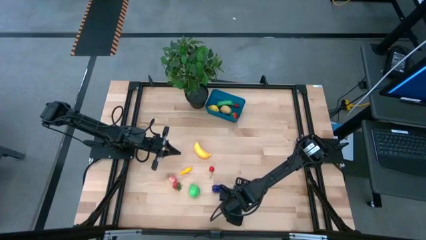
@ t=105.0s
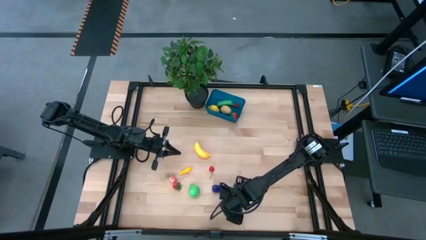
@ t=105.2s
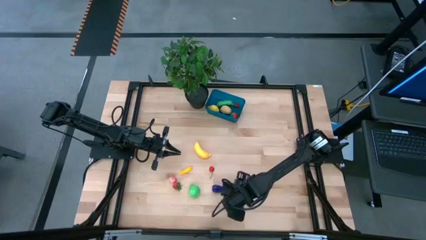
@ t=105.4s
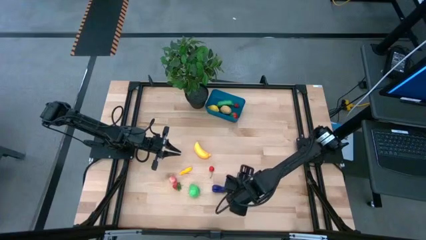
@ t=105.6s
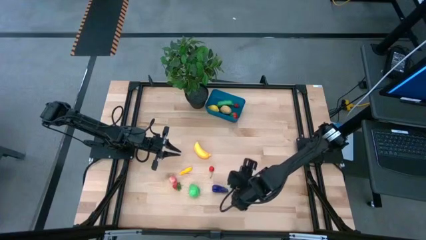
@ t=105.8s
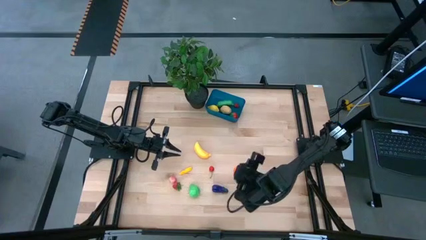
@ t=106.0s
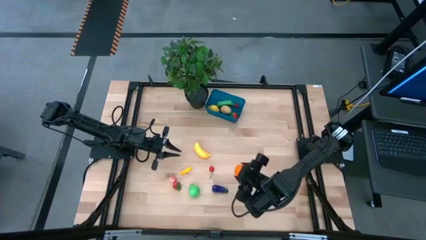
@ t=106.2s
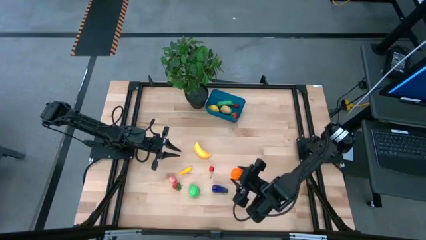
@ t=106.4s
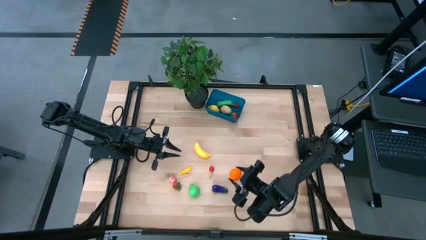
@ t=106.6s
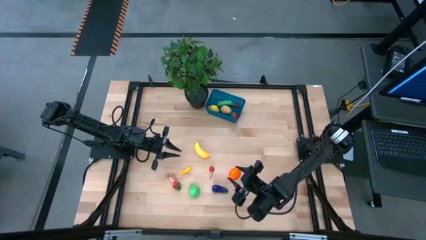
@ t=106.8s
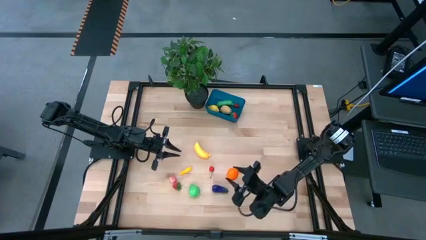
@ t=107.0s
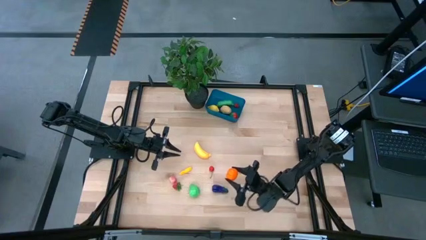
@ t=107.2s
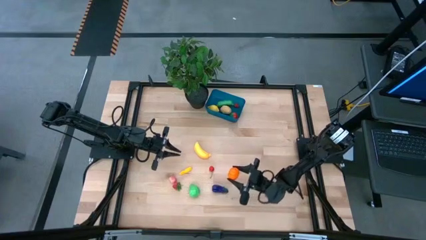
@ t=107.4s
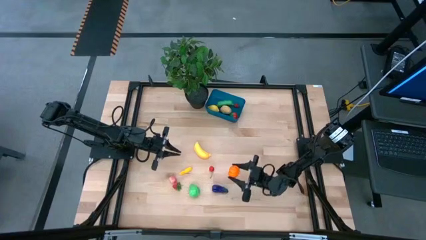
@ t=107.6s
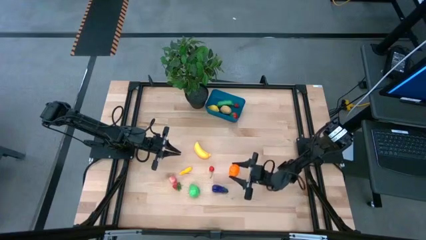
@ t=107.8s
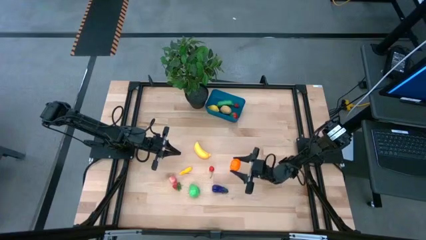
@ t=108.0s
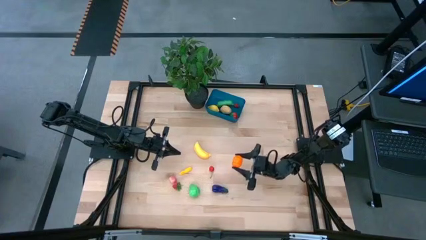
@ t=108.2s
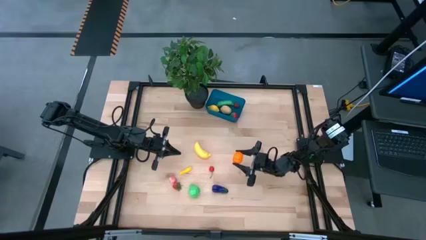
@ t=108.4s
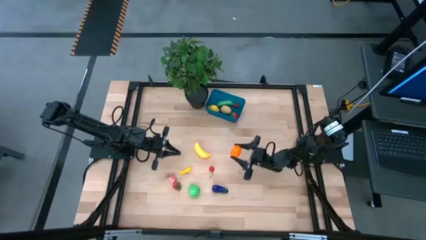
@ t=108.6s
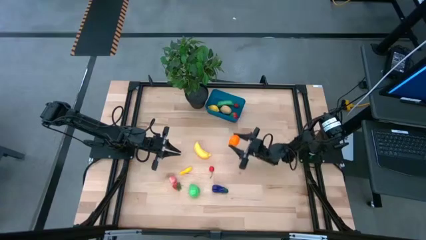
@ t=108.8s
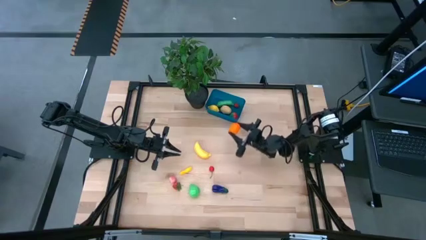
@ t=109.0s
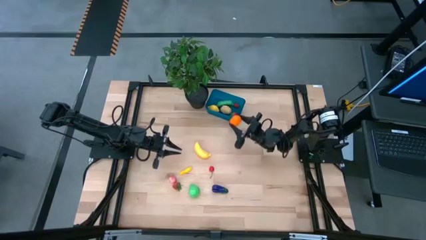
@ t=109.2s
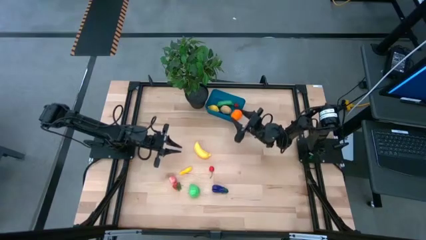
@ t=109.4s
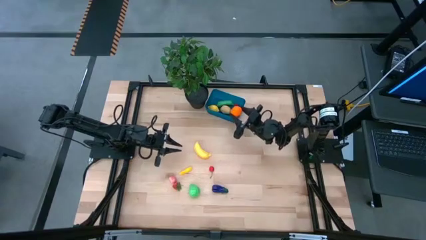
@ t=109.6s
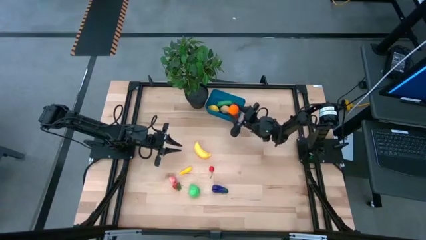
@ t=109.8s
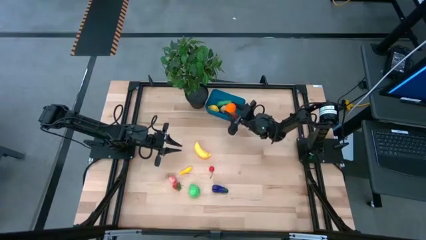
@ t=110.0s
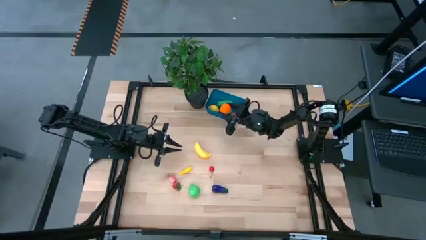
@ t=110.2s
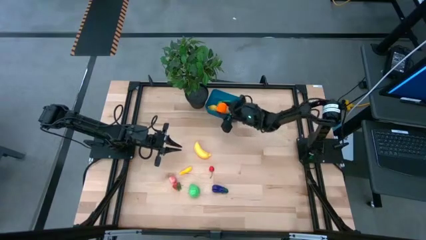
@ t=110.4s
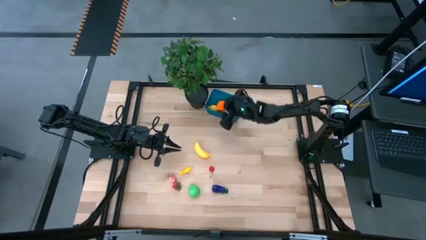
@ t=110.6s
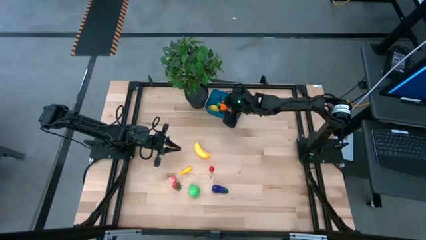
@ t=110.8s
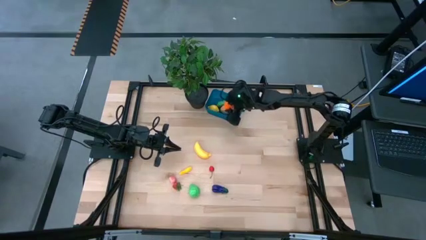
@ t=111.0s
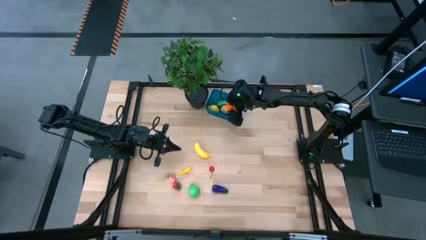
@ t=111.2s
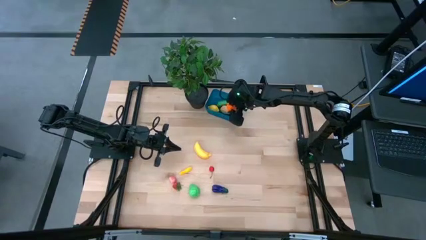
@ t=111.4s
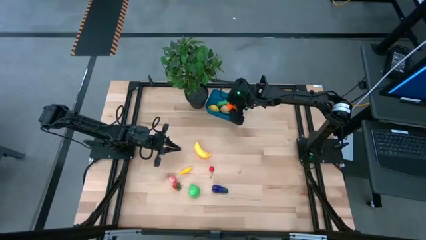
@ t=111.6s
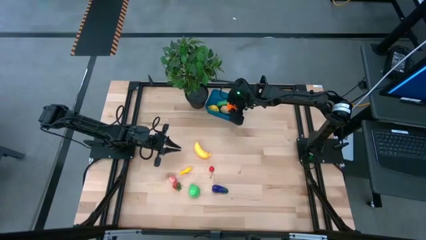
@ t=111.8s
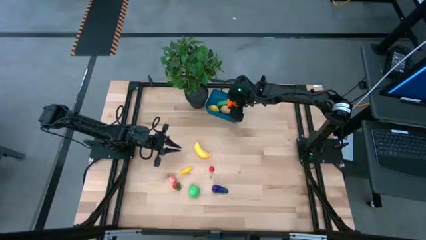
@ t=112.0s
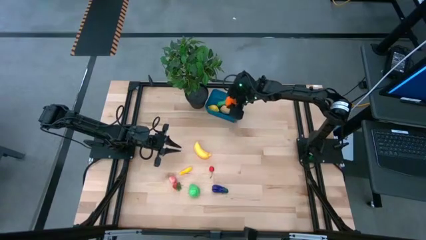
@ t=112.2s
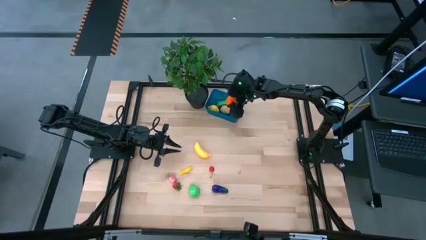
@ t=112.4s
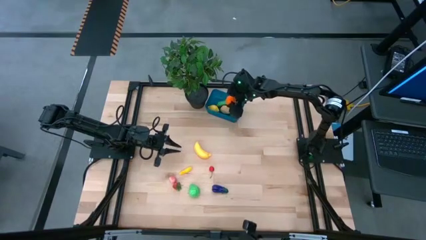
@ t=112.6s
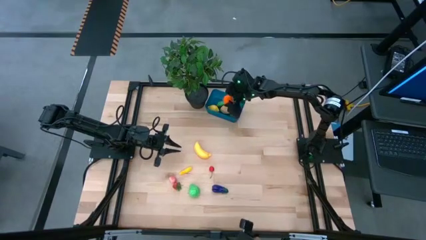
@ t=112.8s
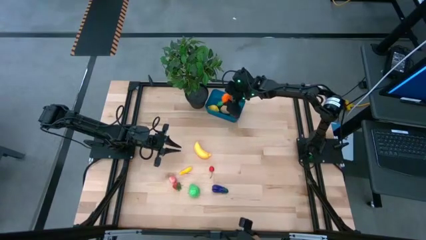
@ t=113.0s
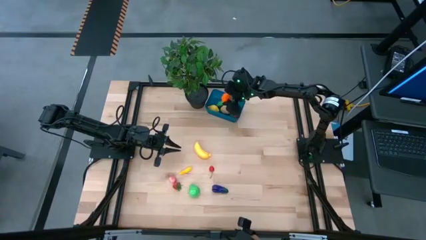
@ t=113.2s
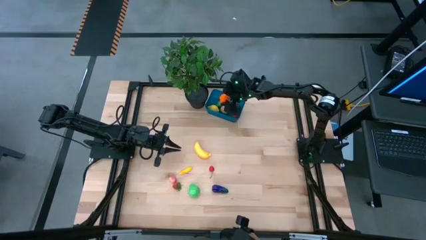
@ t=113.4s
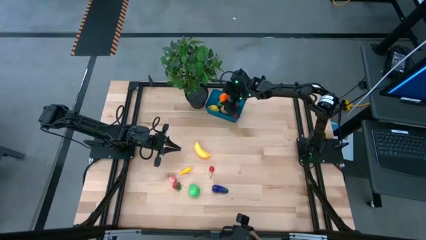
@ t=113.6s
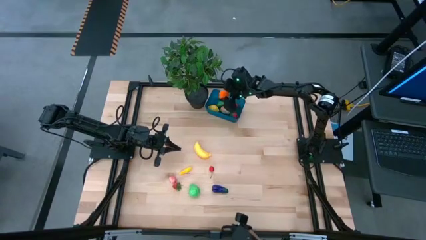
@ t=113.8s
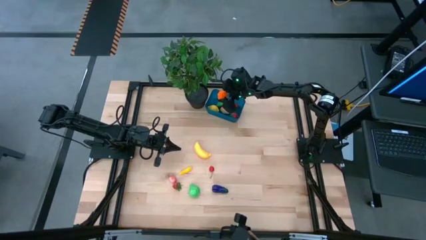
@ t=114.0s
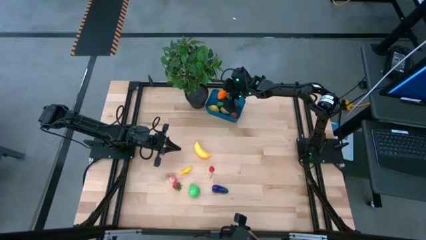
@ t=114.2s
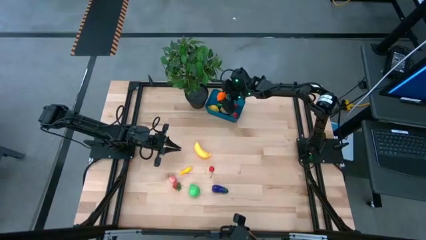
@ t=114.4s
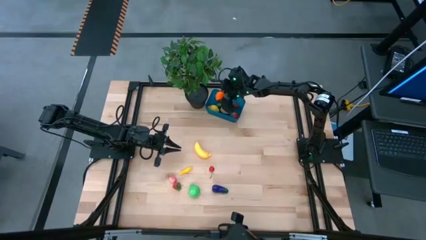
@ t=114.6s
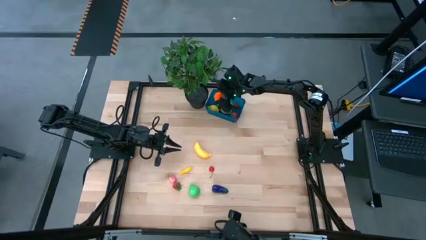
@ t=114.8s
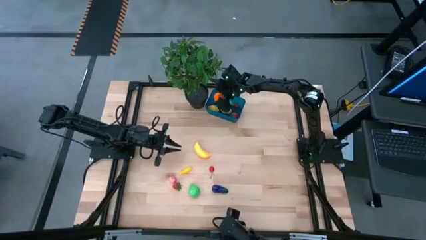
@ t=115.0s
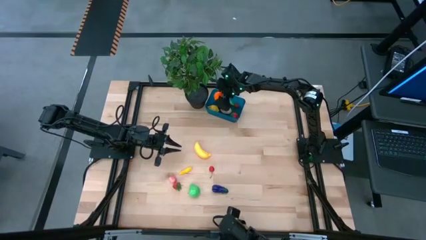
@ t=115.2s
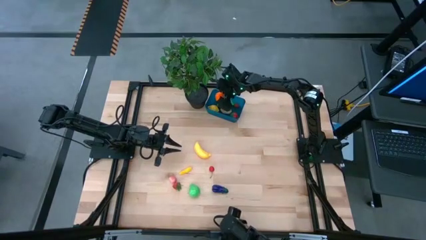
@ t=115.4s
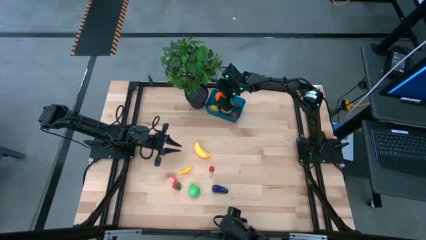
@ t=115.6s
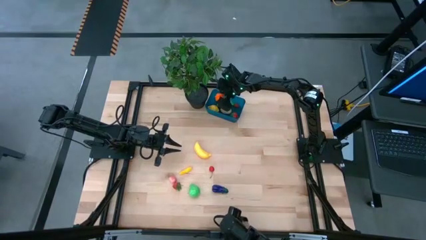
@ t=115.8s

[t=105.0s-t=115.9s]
Task: Pick and placing Produce into tupperware
Put the orange pumpkin into the blue container
